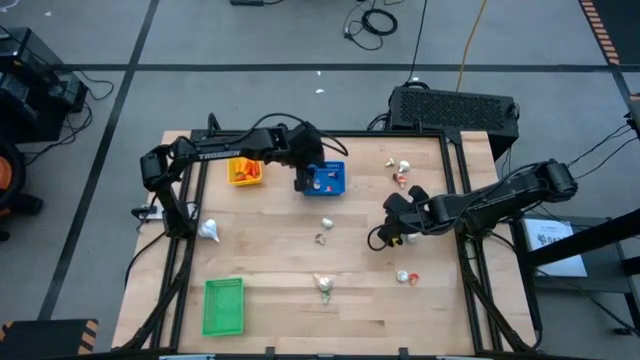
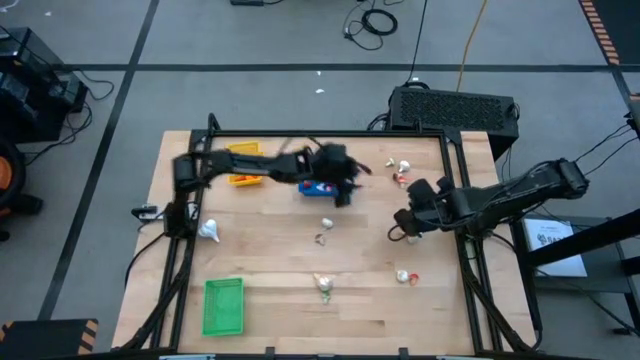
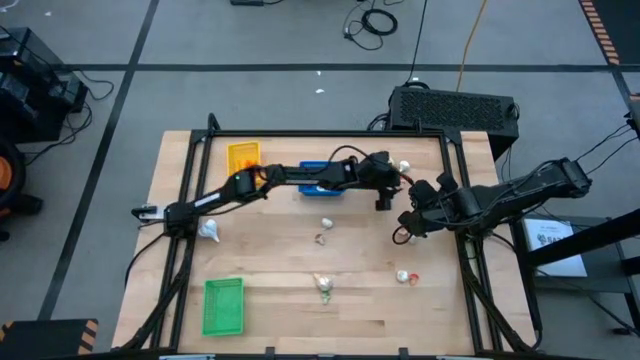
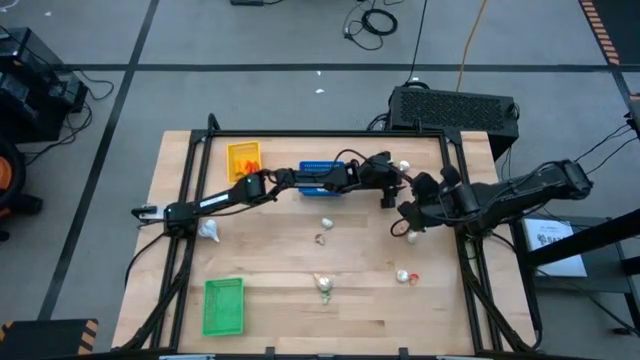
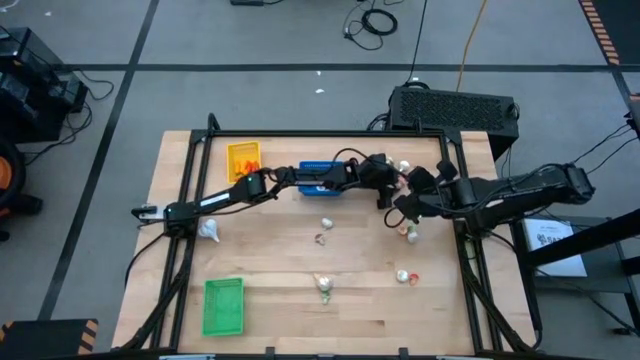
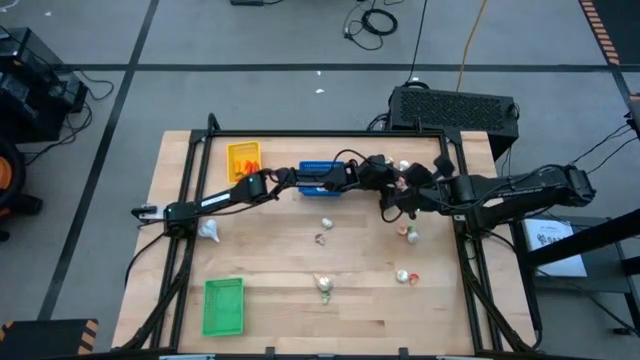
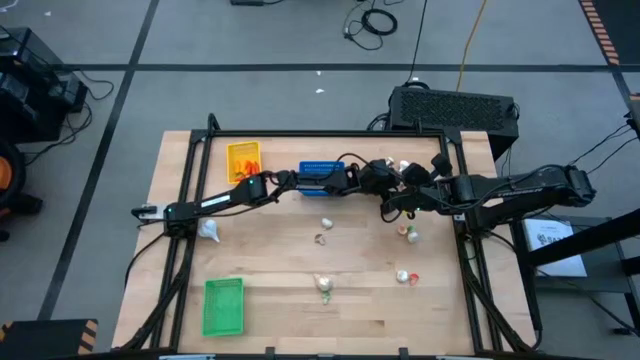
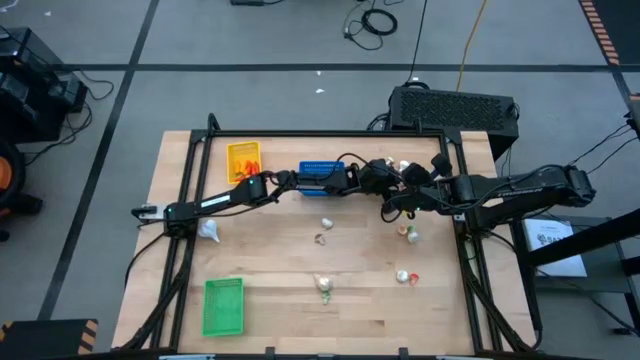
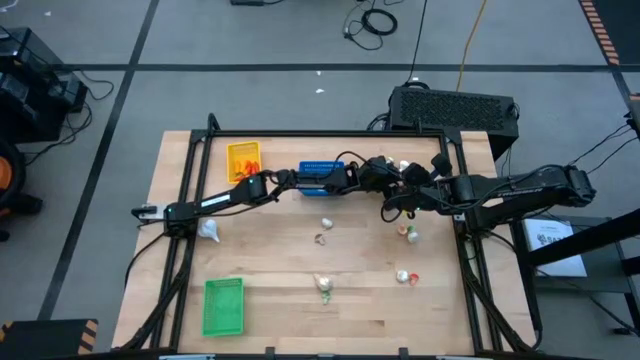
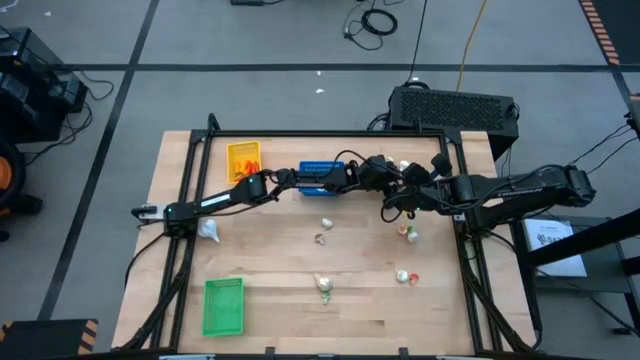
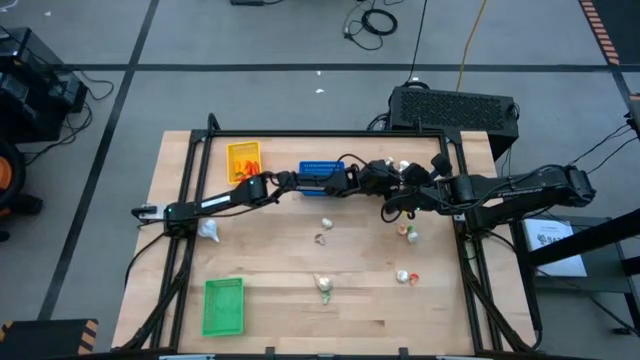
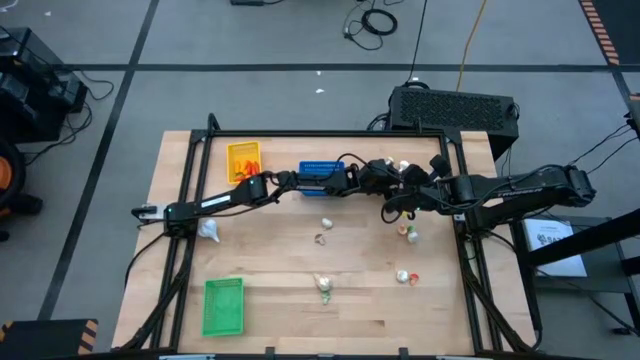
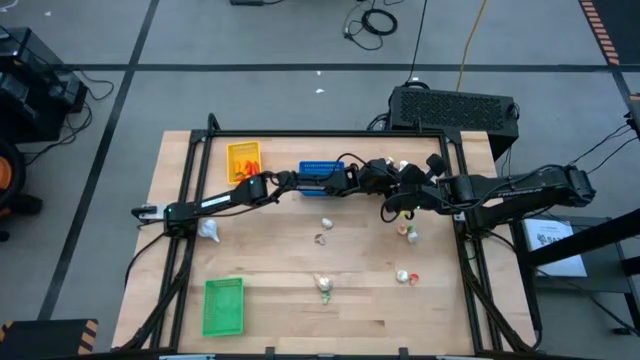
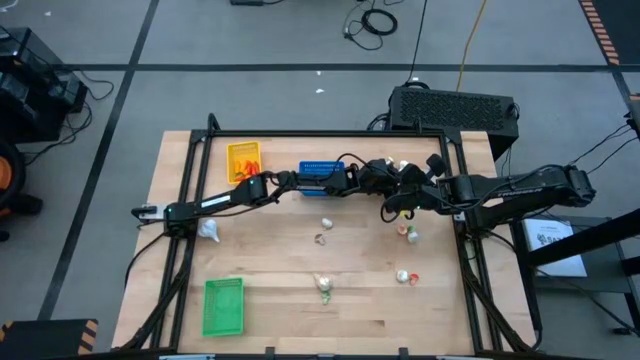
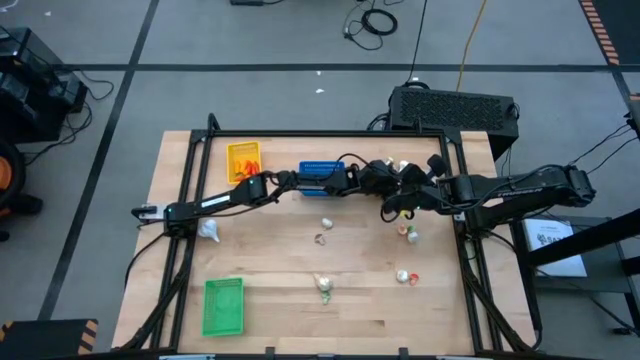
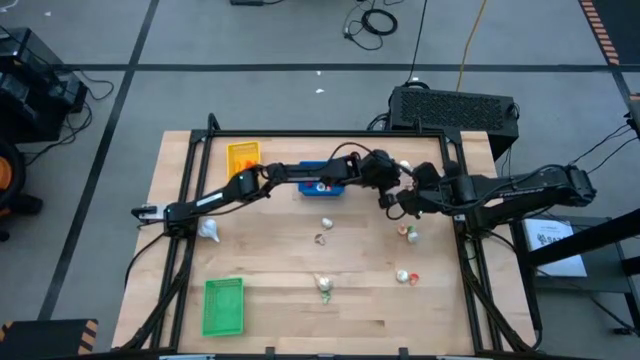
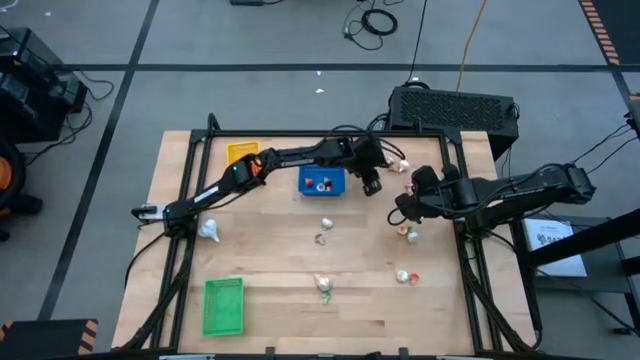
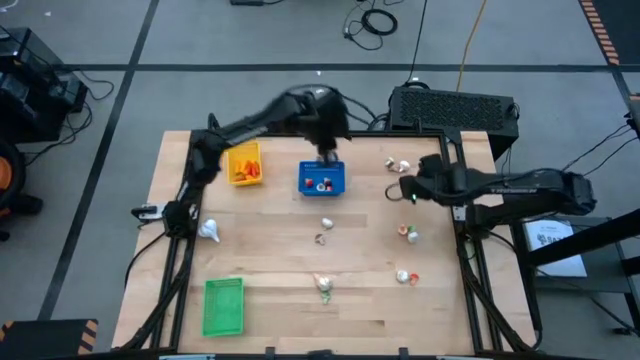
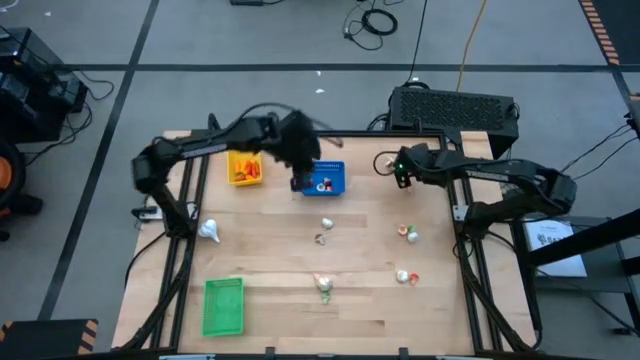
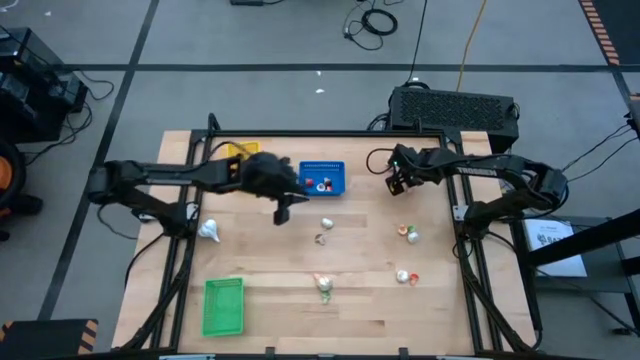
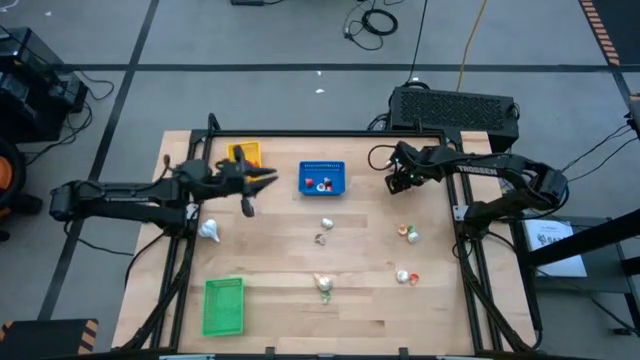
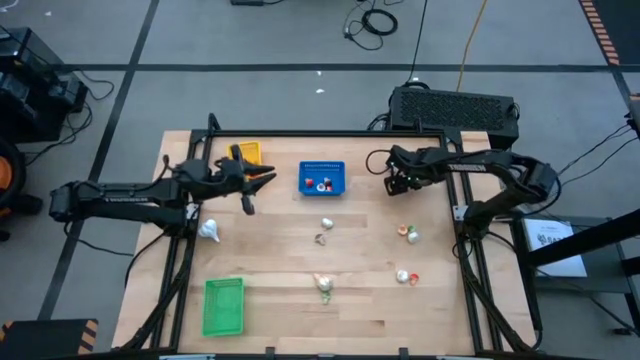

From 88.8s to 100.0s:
Task: Sort produce into baskets
Put the orange mushroom into the blue bin

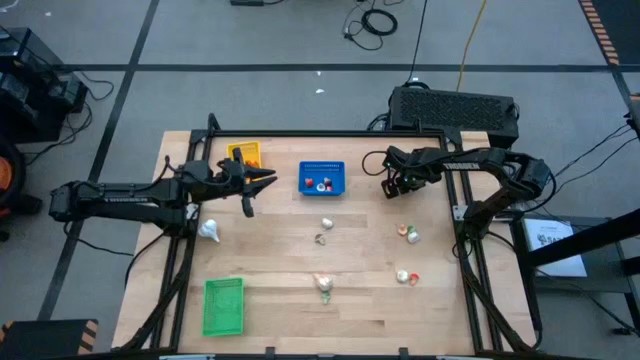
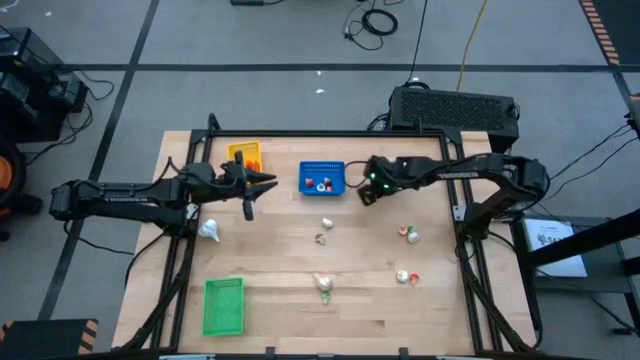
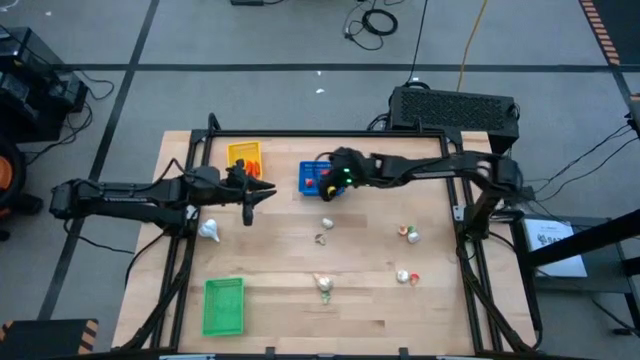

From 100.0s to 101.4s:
Put the orange mushroom into the blue bin

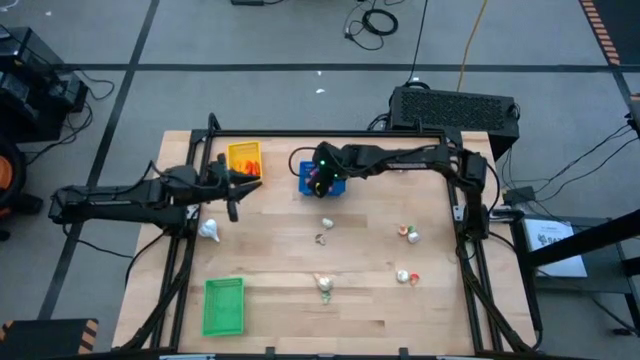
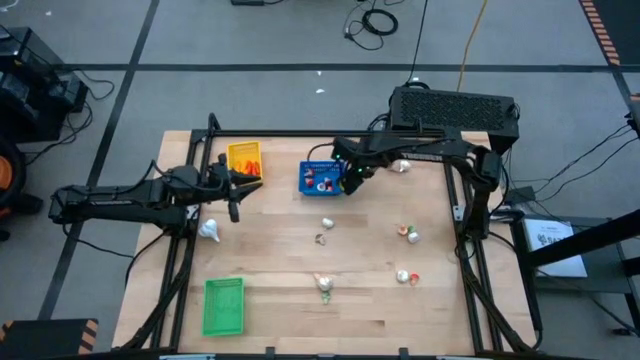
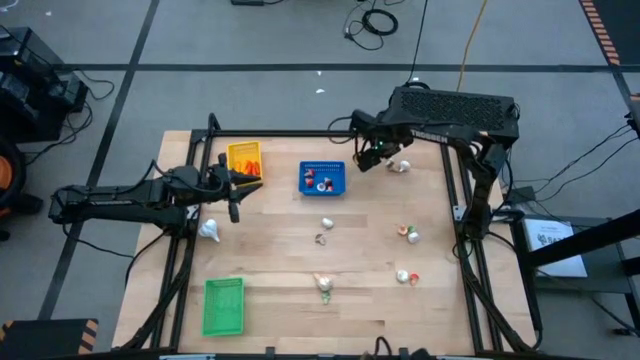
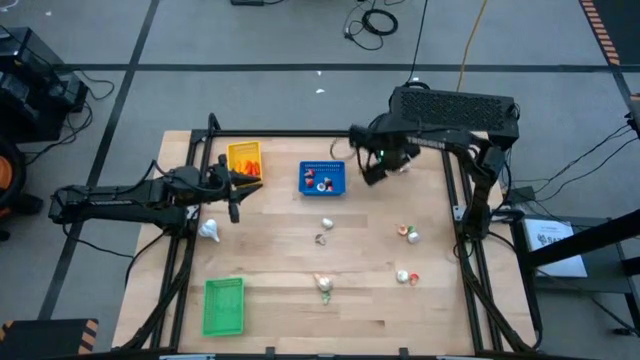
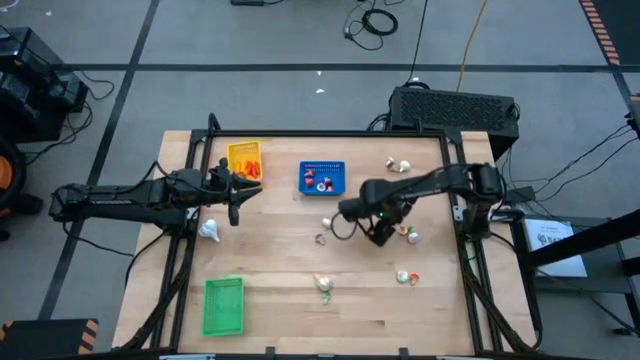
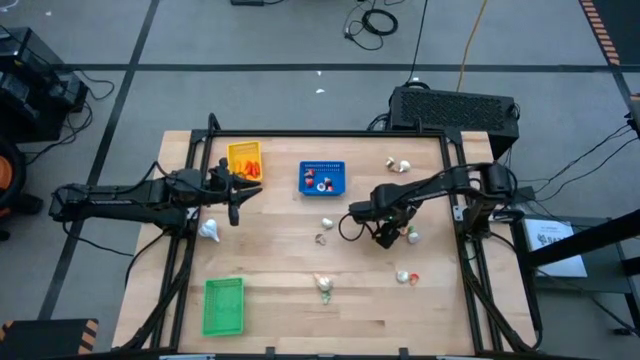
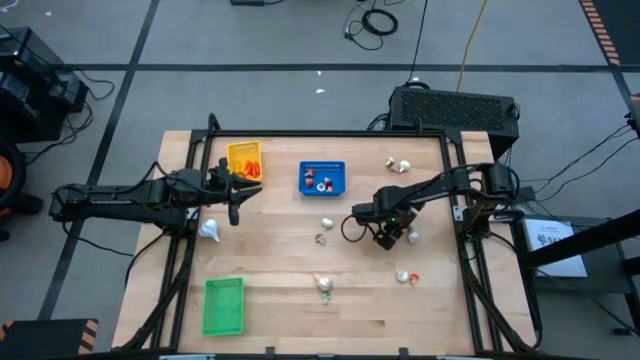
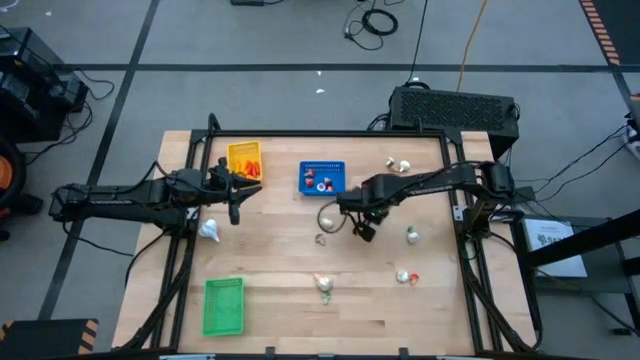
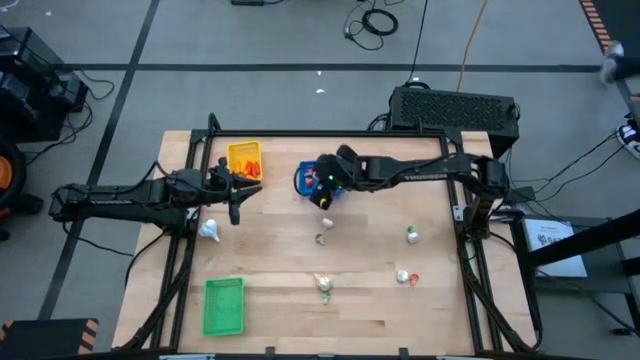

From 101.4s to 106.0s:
Put the orange mushroom into the blue bin

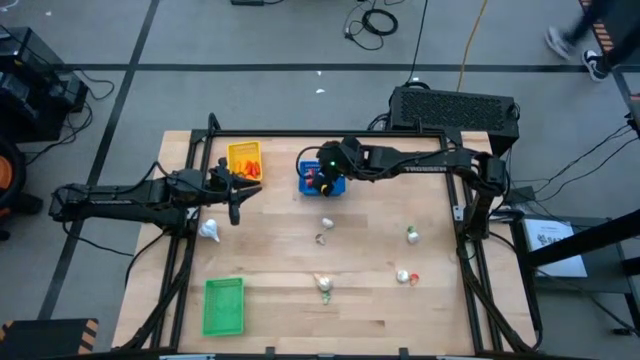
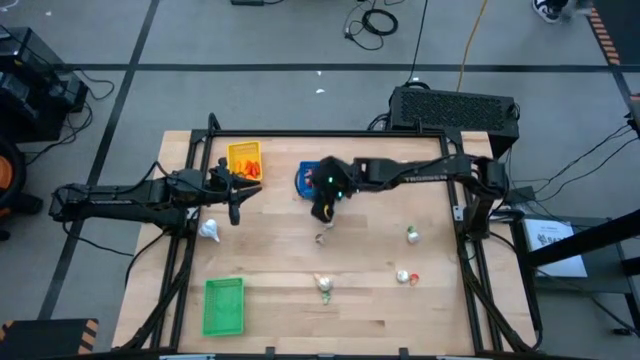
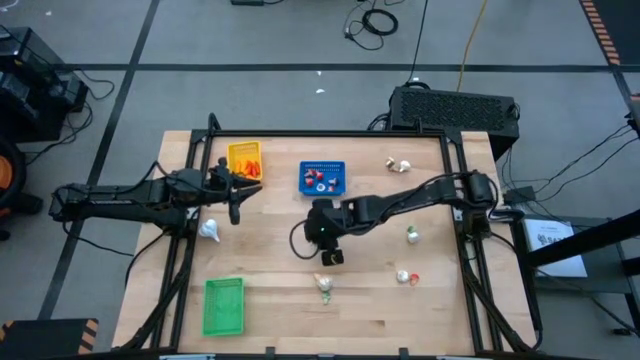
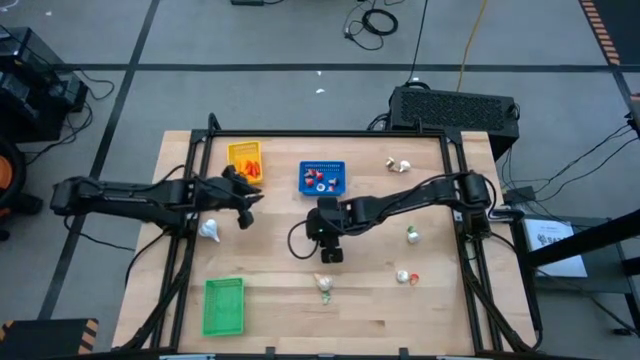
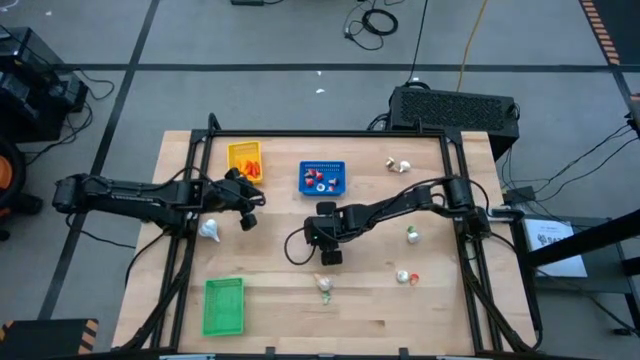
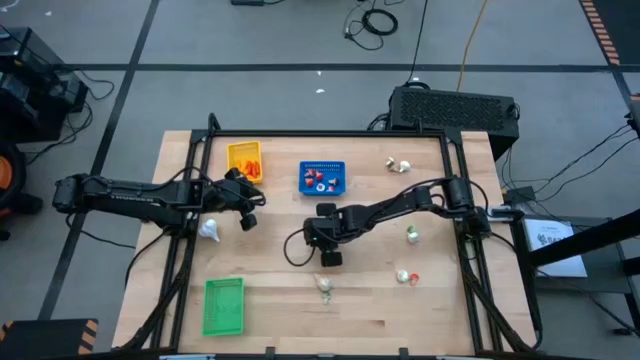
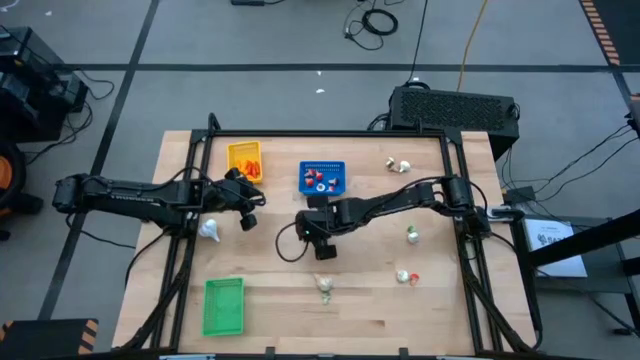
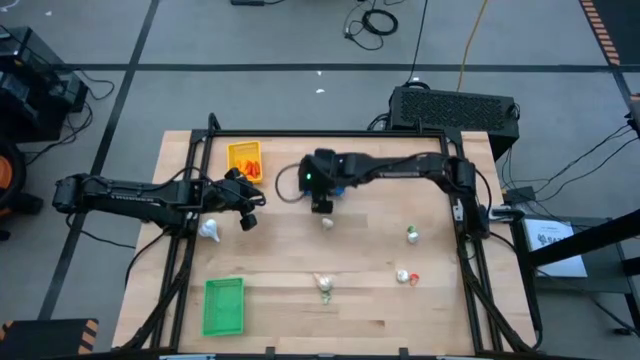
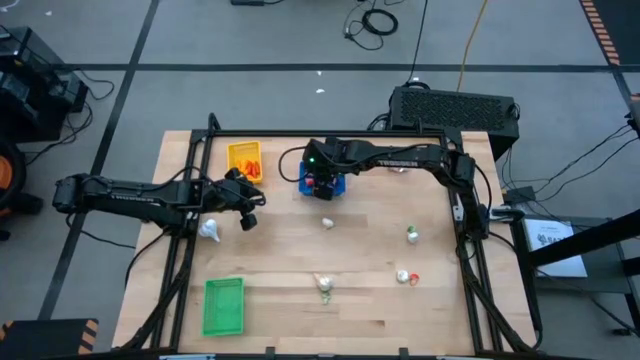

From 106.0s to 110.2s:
Put the brown mushroom into the blue bin
